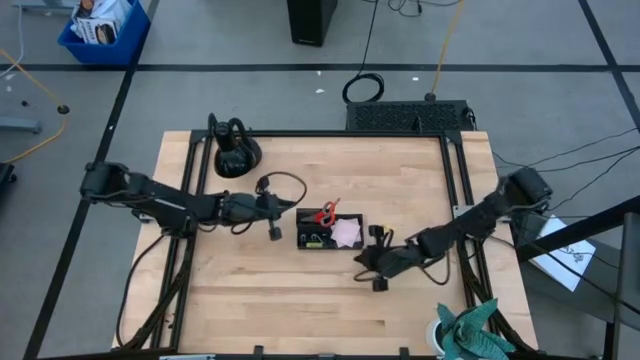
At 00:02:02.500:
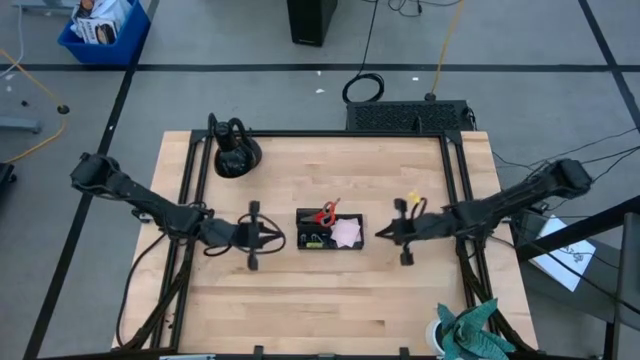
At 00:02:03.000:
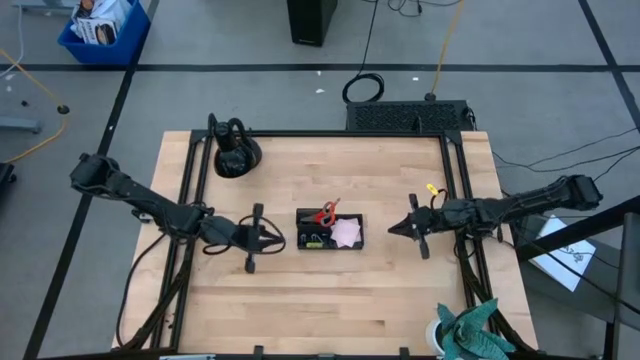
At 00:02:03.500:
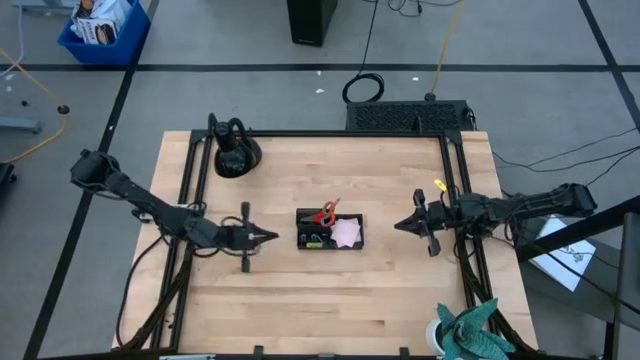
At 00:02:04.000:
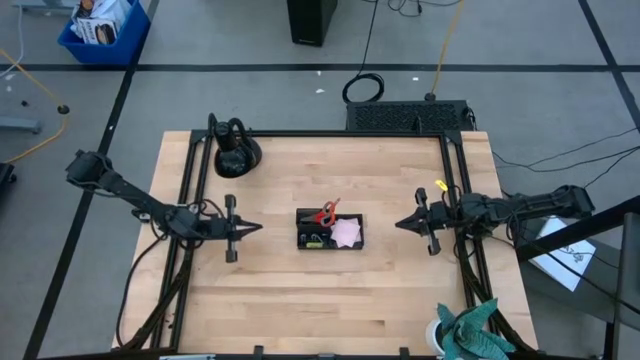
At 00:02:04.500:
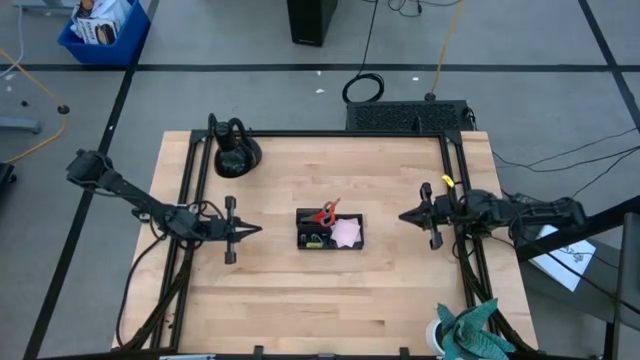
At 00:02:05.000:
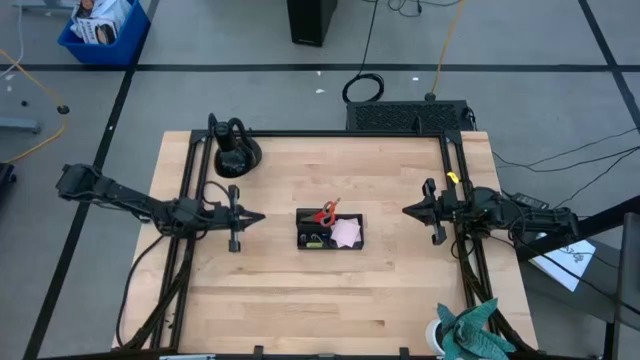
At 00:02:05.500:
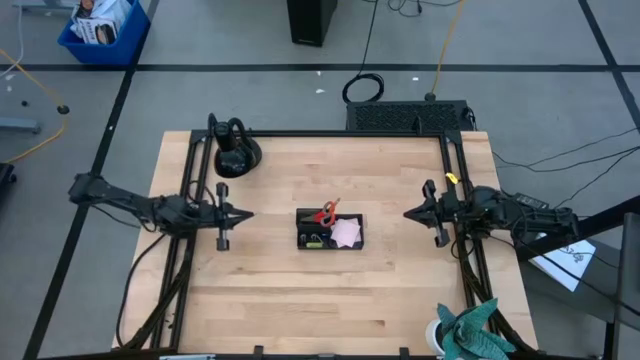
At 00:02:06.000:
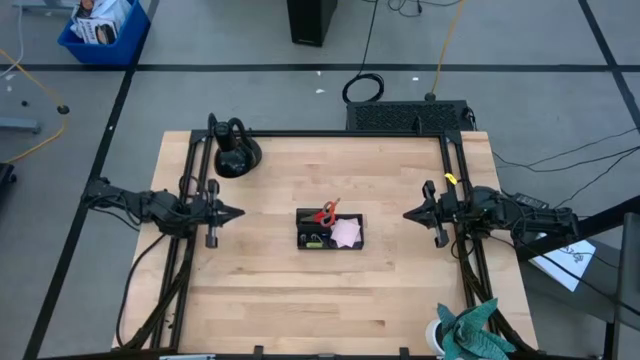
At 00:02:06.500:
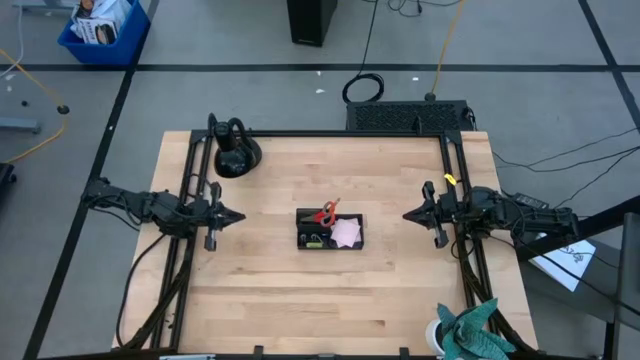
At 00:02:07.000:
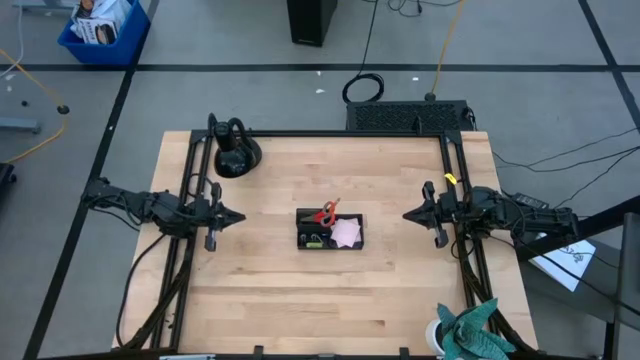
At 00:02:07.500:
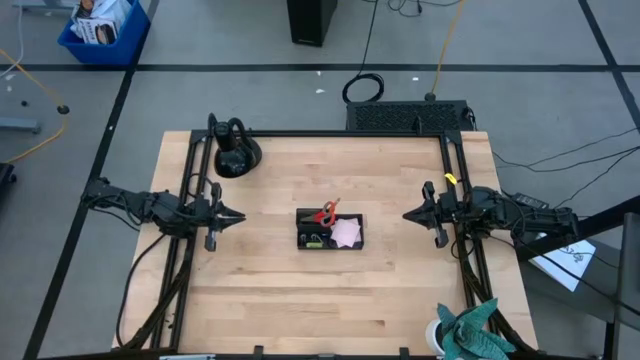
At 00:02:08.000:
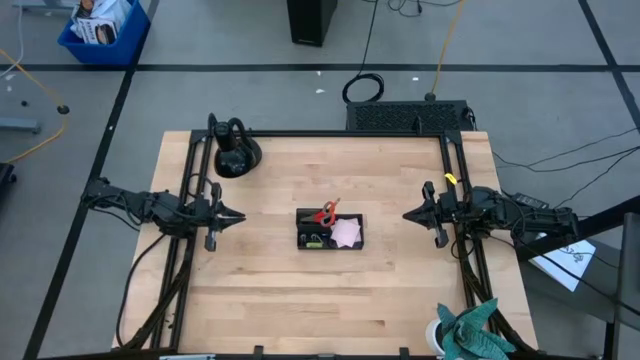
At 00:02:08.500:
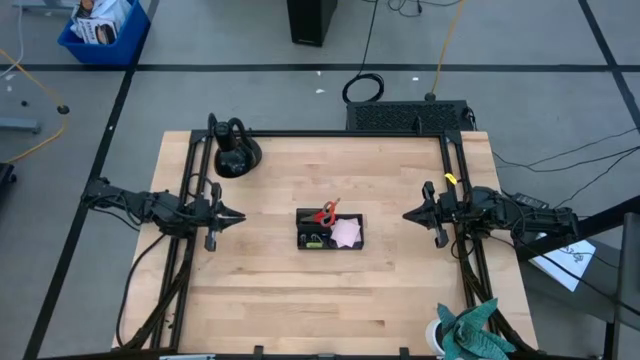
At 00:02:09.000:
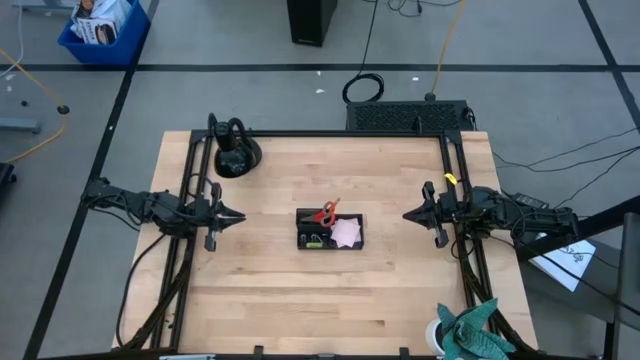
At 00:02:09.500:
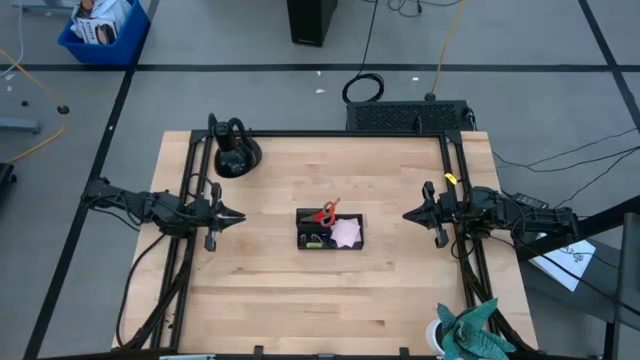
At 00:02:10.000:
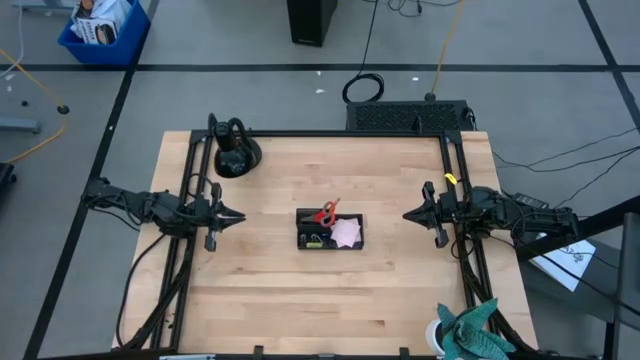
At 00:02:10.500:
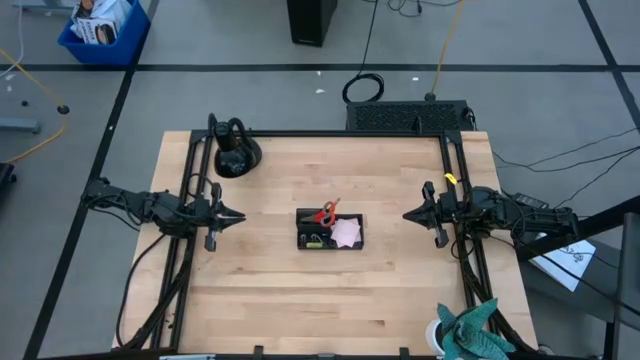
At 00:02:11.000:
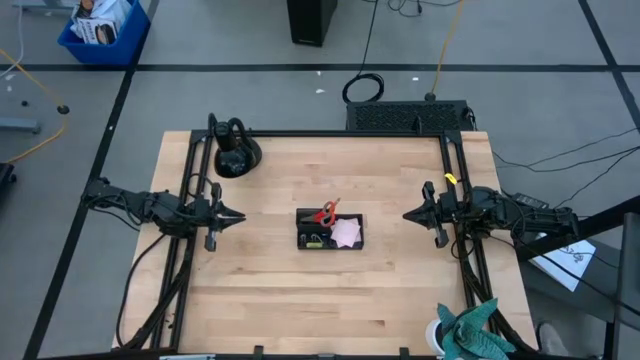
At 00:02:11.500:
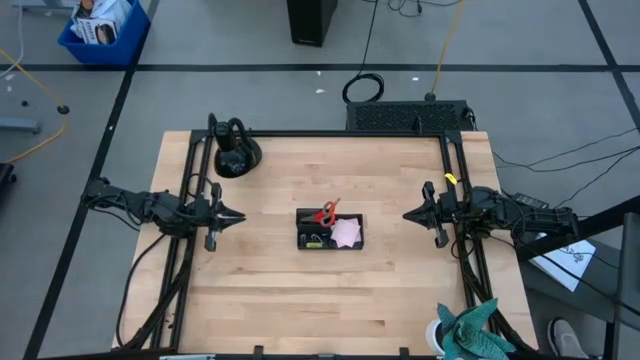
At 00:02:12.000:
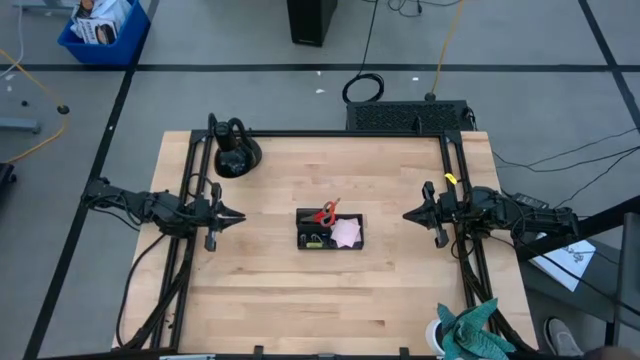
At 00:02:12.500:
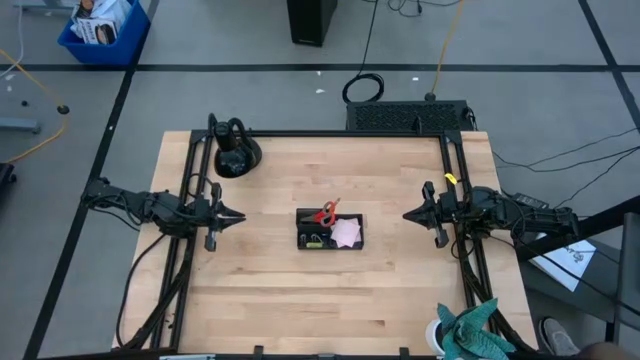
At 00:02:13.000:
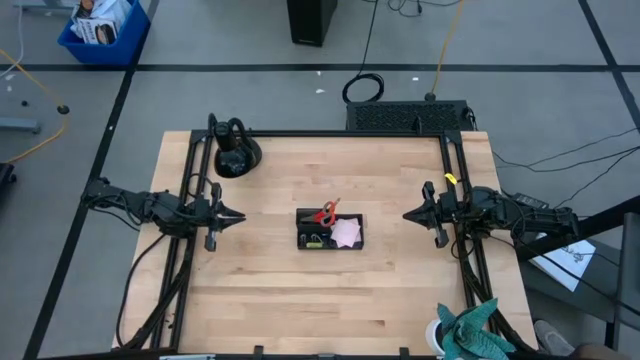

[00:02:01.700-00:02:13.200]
Task: Pick and place office supplies into organizer
Return to Home Position

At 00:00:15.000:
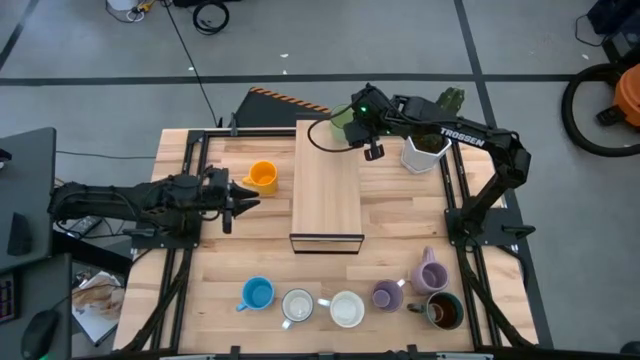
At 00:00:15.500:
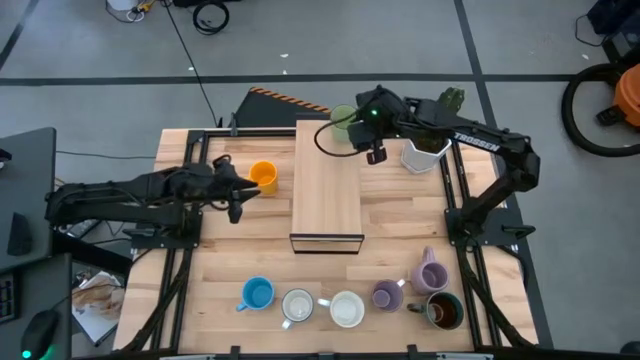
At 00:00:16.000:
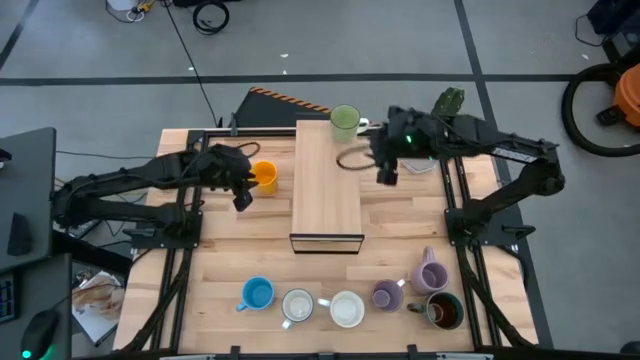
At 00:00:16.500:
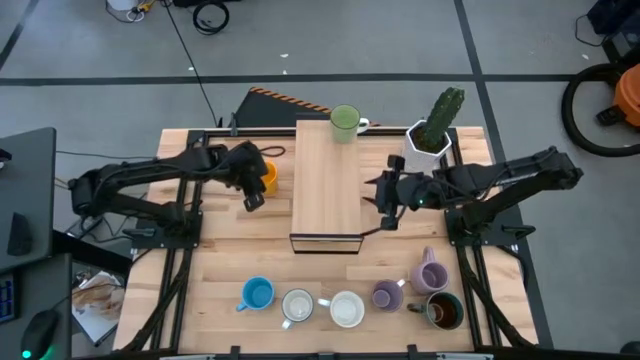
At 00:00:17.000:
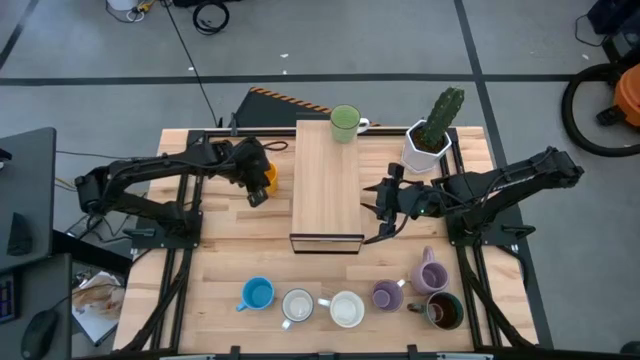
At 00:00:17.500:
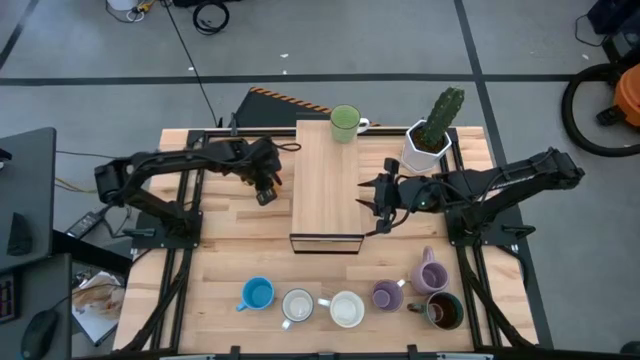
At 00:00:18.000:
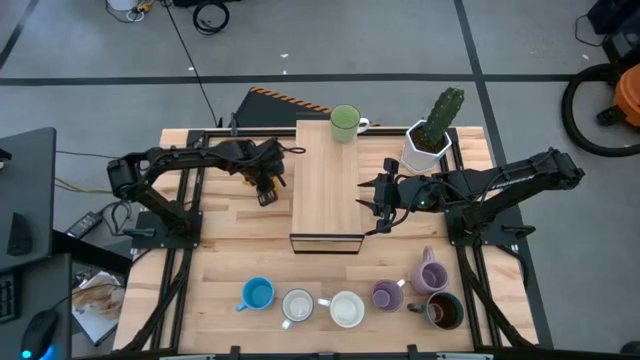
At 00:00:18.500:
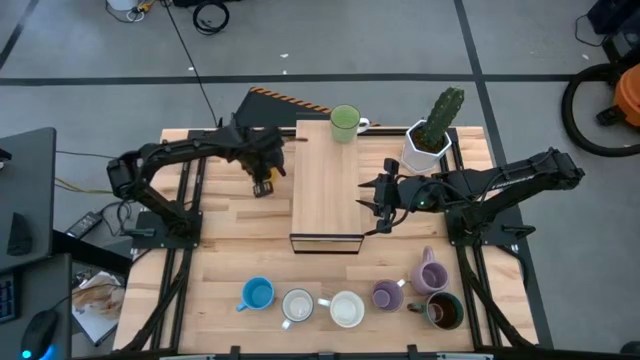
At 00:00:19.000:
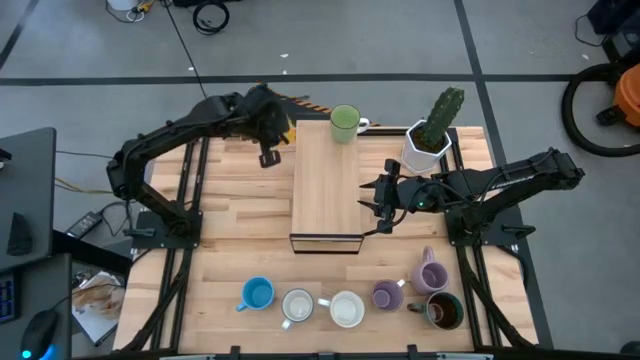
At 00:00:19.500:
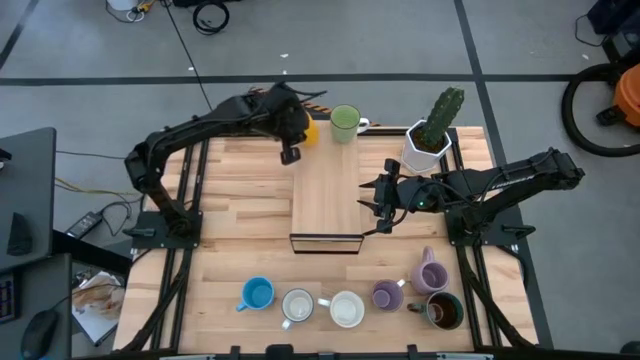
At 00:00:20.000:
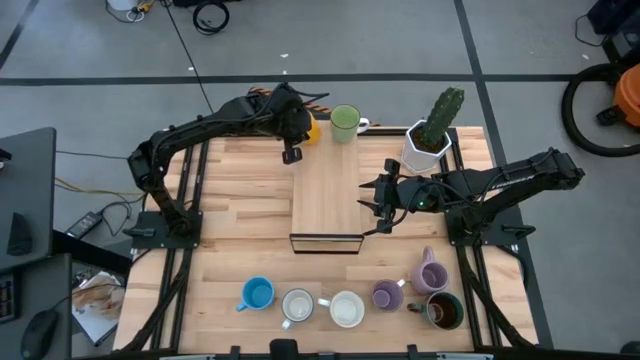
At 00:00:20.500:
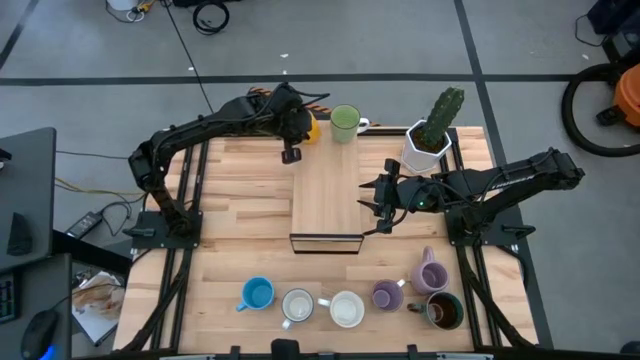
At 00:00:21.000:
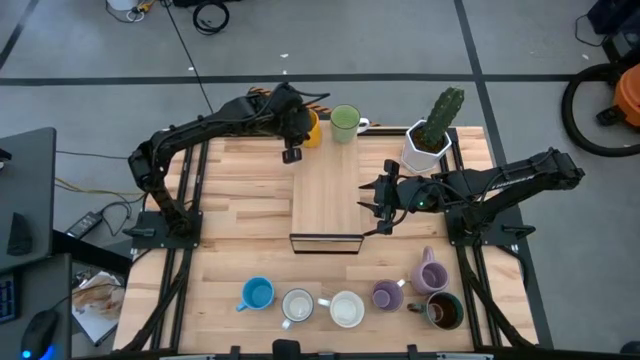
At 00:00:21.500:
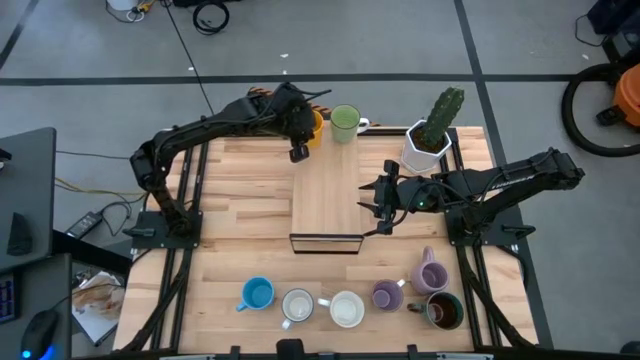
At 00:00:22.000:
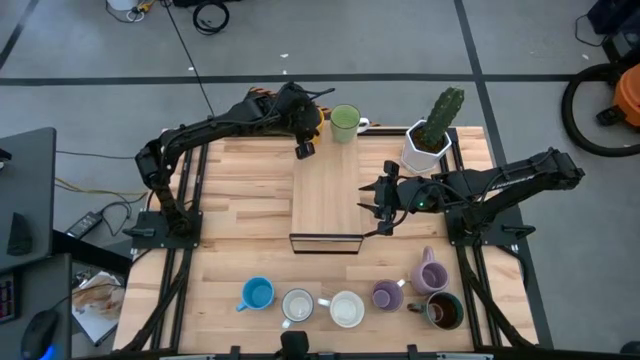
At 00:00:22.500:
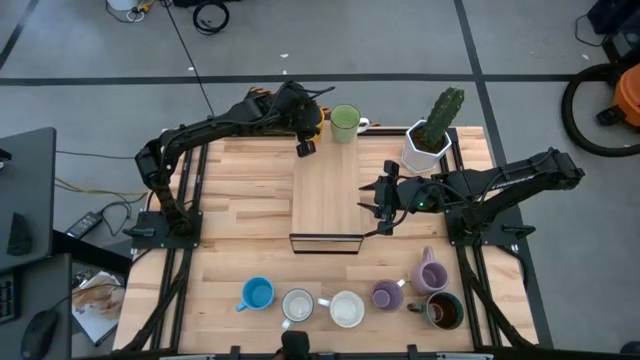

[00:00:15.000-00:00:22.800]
Task: Place coffee mugs
Put the yellow mug on the shelf

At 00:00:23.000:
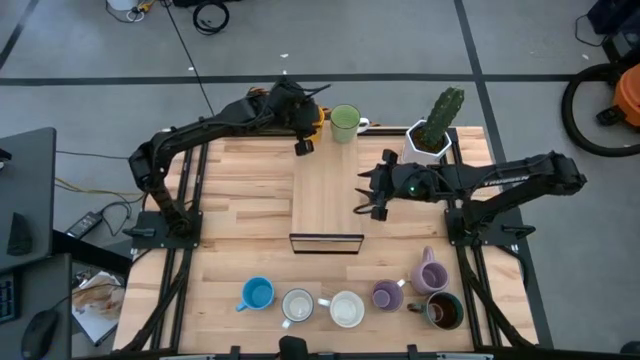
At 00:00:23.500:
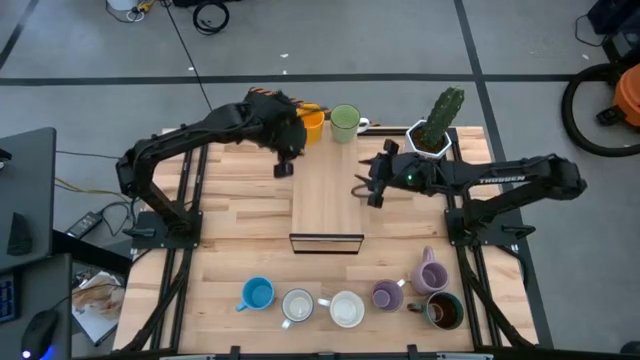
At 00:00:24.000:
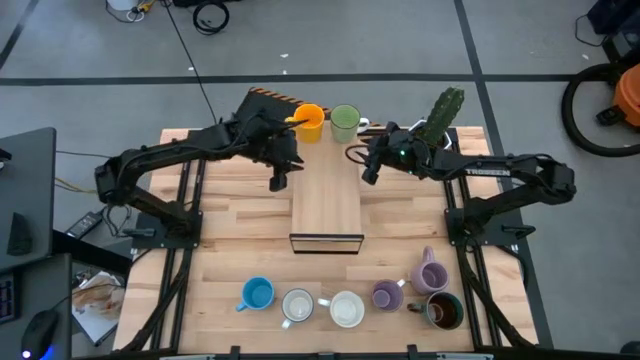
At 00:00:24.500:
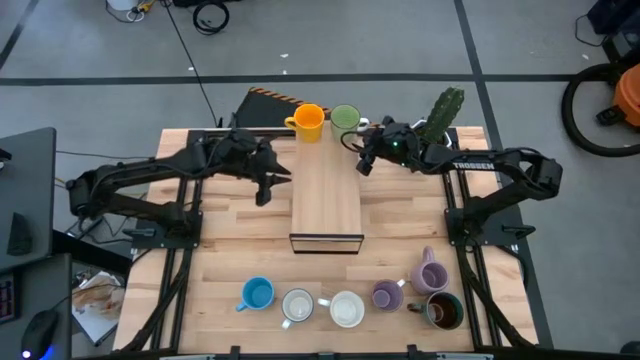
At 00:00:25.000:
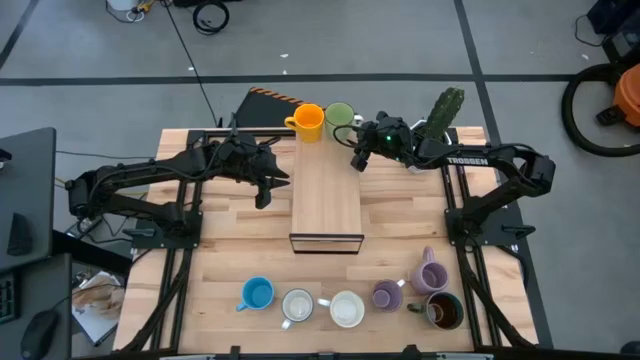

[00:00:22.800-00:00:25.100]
Adjust the green mug on the shelf
